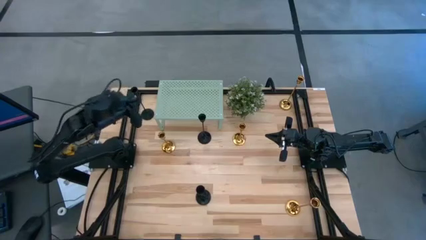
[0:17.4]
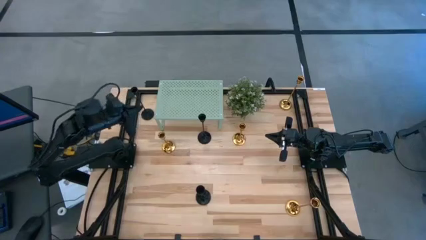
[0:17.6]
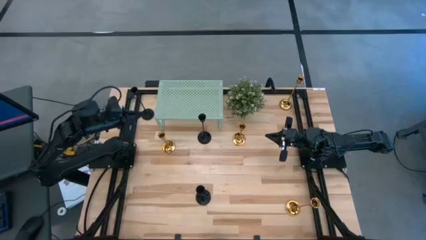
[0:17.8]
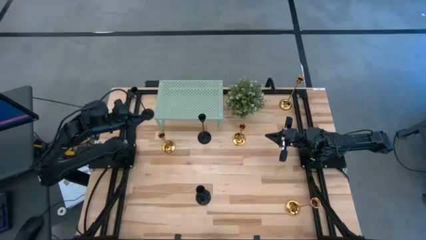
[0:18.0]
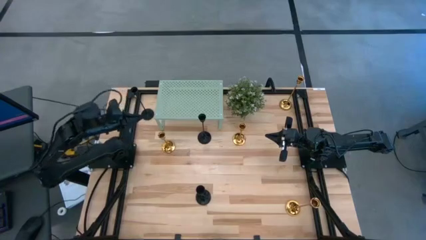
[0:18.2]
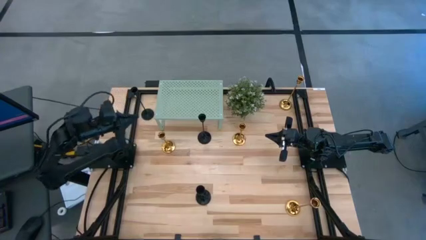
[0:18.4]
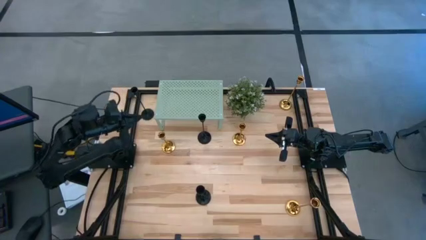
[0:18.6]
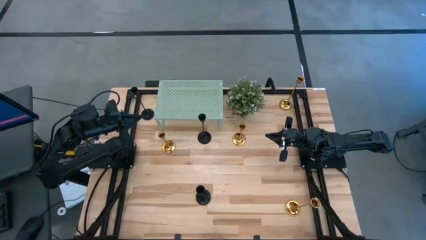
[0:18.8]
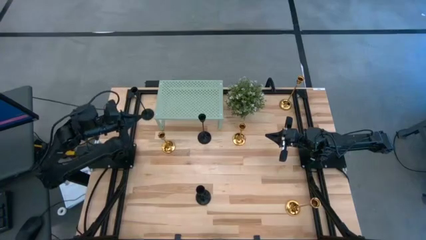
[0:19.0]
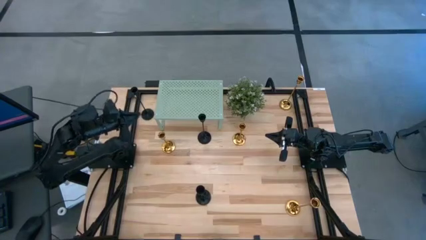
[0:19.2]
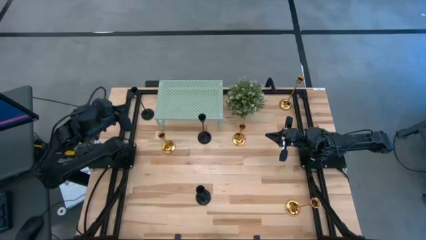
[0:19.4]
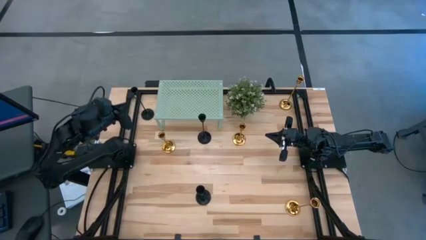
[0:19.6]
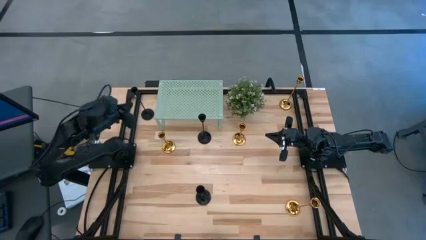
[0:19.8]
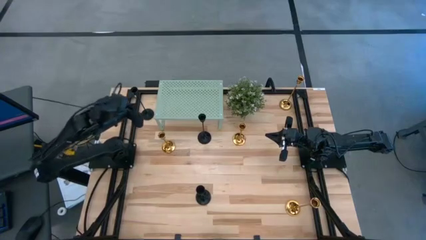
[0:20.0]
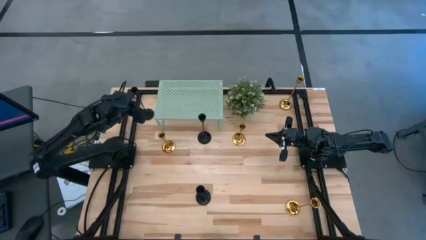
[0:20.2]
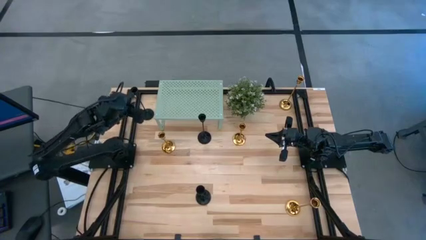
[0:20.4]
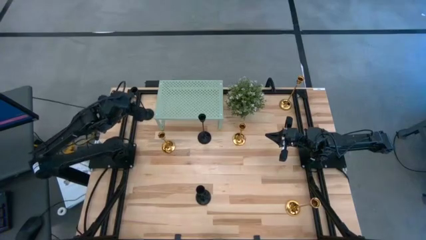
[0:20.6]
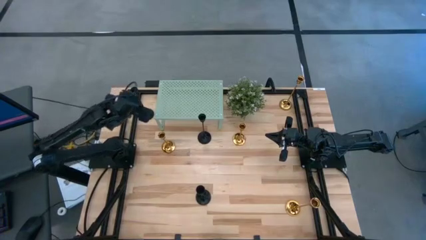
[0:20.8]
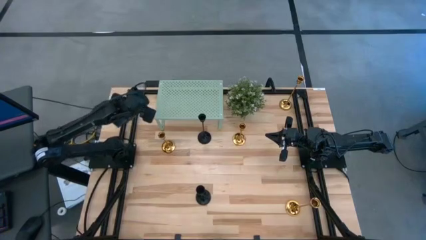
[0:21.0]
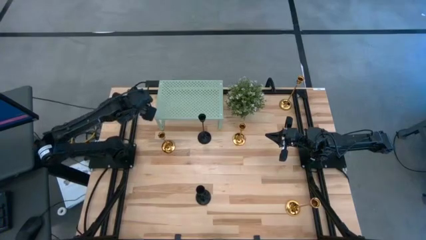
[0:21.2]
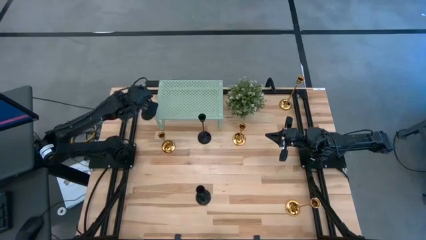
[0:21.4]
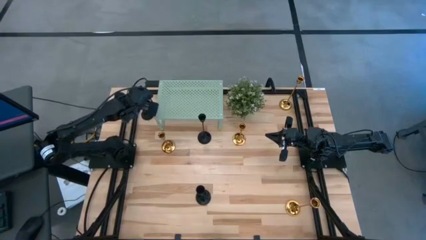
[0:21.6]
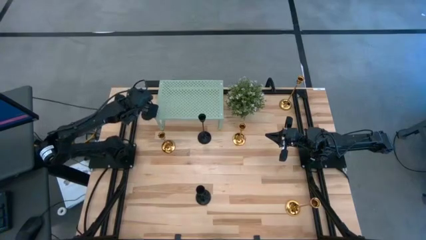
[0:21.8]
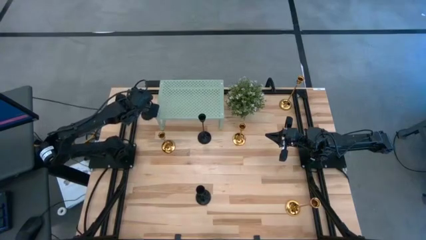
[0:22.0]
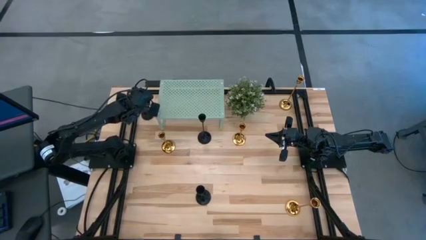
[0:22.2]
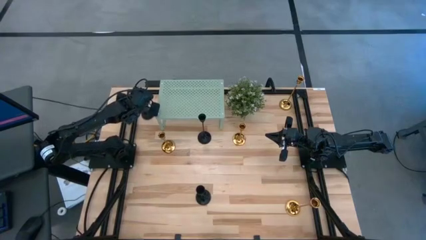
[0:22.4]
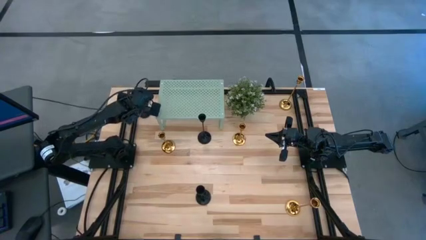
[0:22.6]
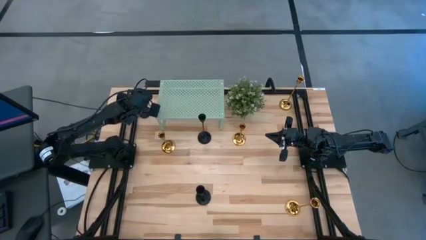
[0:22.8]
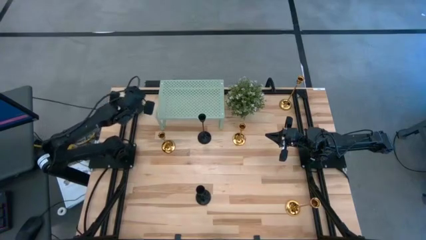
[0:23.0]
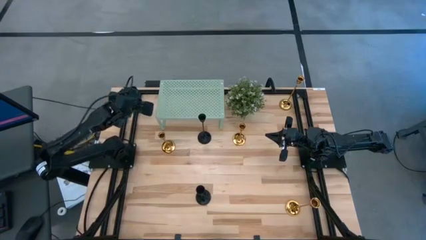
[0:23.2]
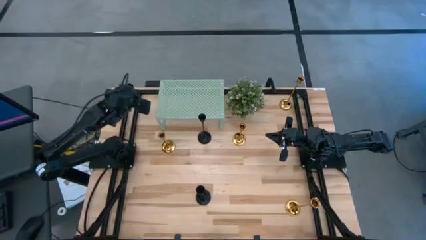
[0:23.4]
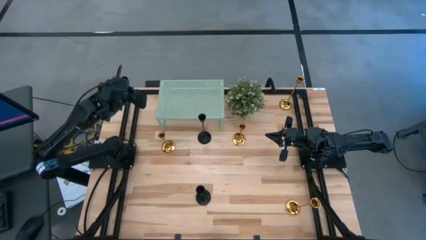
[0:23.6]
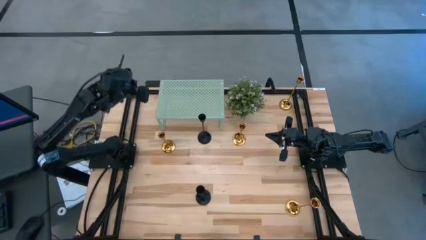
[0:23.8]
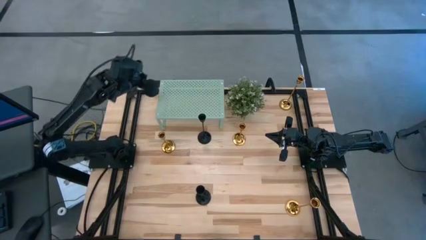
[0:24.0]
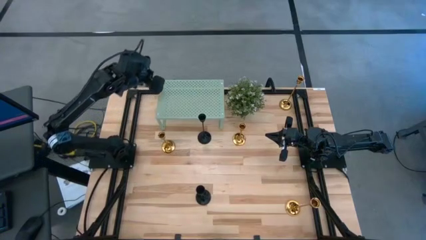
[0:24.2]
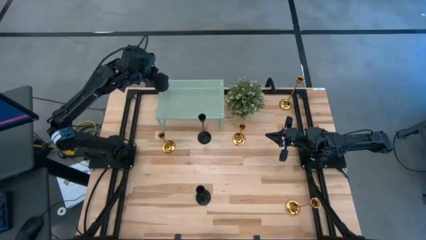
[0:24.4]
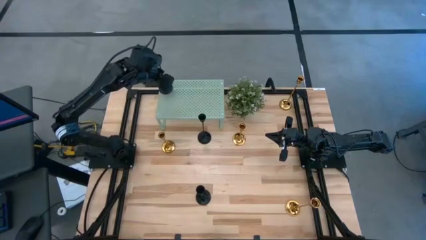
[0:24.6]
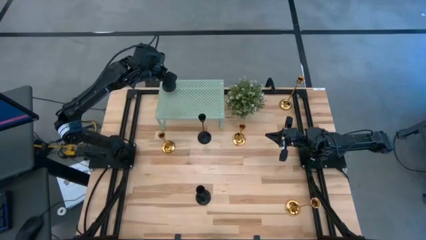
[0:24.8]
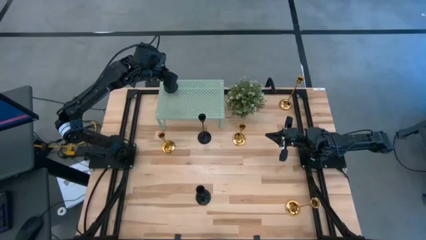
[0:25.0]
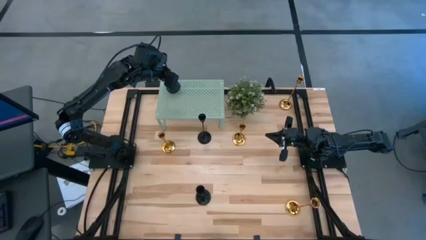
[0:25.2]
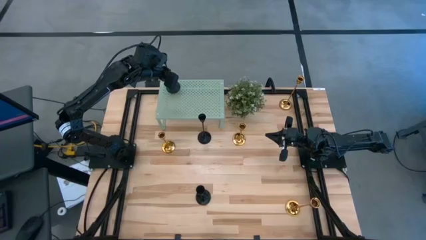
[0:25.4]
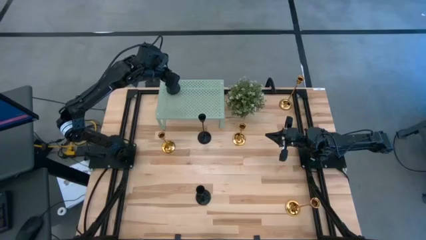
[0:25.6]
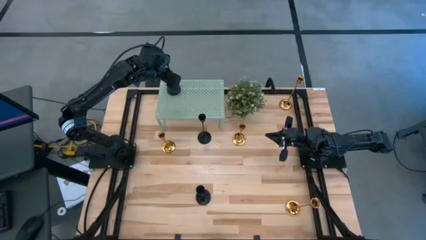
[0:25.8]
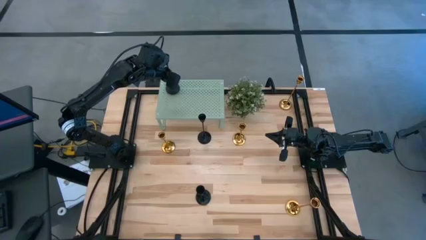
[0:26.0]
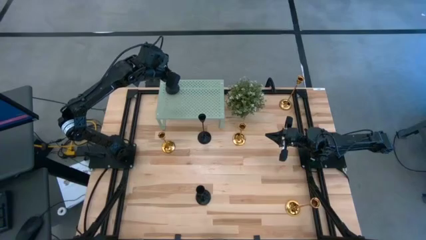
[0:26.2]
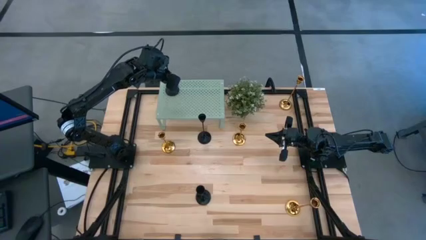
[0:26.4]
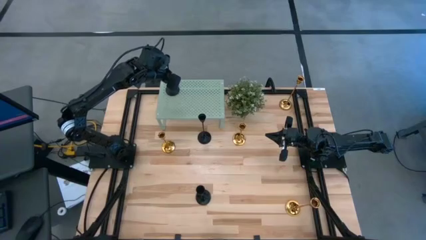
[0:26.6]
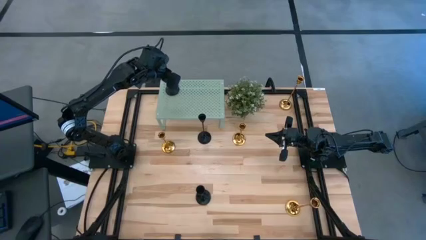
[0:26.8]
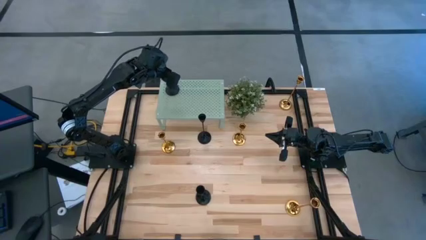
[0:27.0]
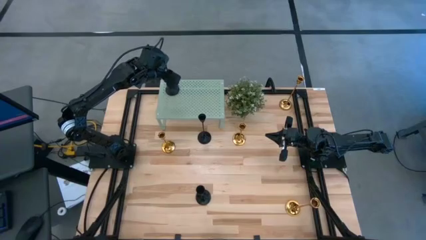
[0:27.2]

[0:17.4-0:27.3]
Task: Pick & Place candle stick holders
Put the black candle holder on the shelf

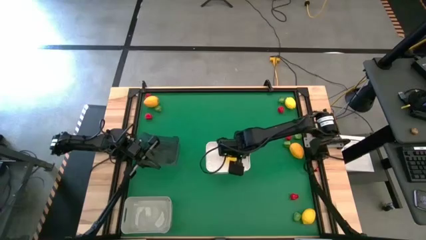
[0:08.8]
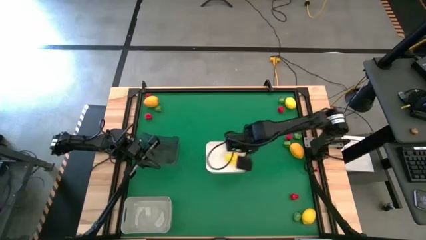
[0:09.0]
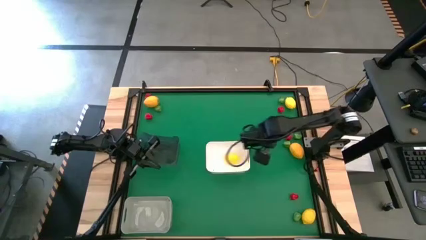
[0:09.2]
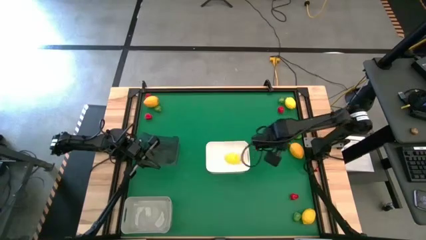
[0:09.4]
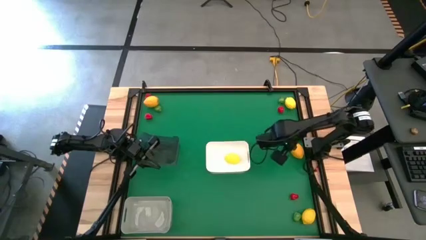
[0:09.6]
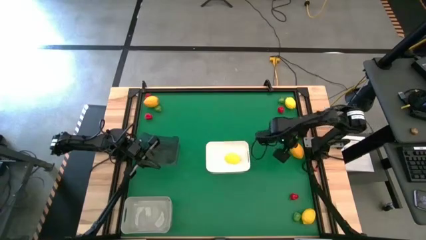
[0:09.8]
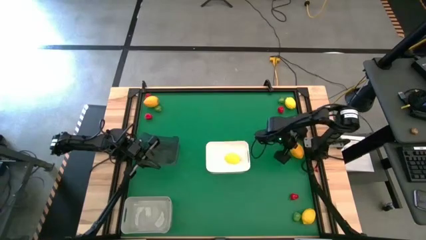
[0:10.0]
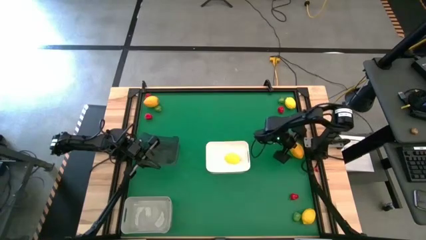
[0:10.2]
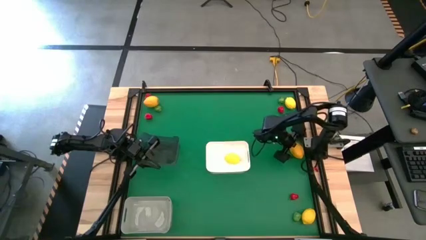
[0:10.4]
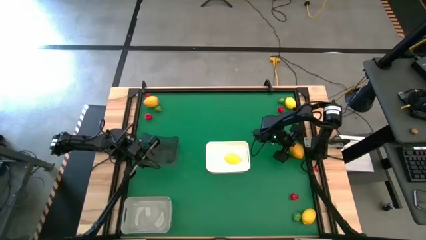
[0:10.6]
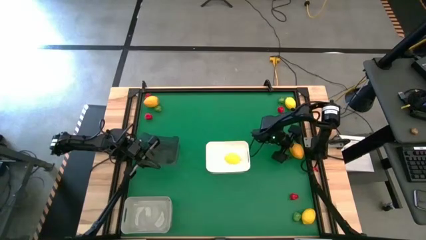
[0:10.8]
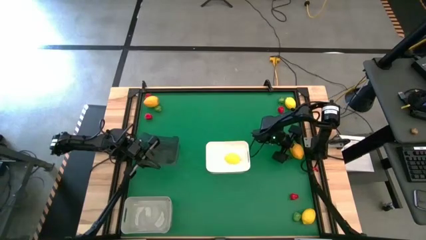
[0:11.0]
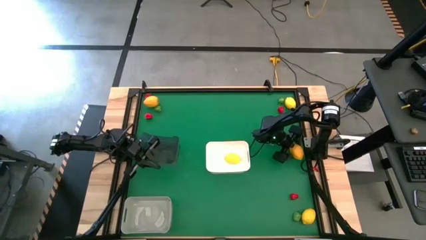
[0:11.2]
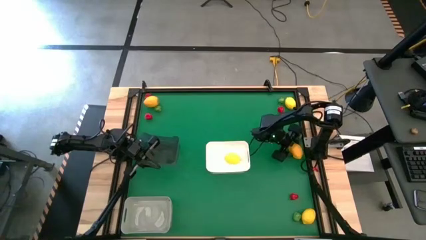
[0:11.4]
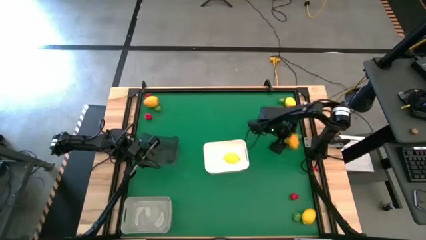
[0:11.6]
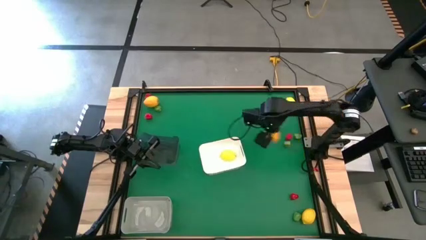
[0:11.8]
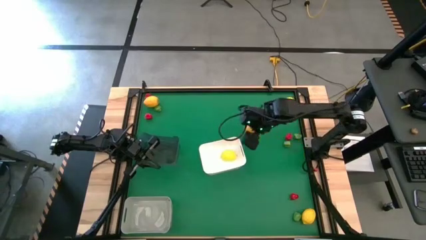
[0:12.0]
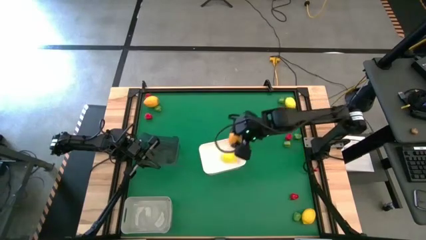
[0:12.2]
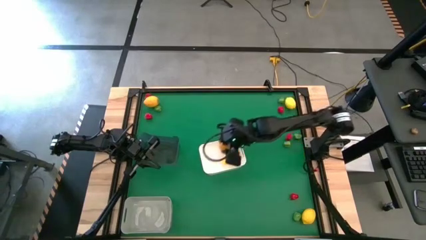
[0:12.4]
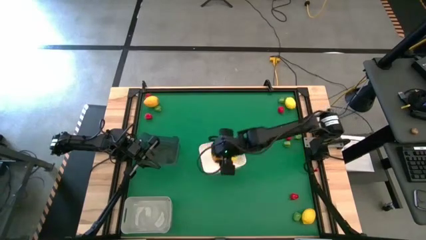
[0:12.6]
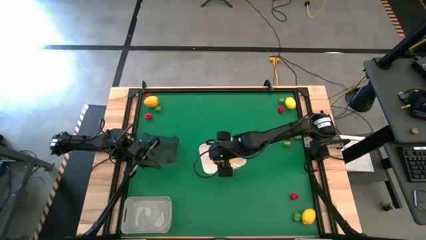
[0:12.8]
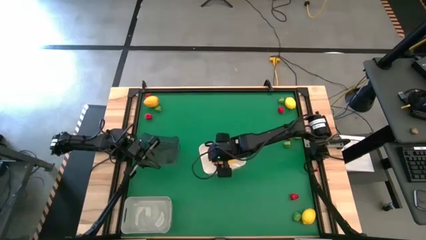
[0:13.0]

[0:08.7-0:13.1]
Task: Sort produce into baskets
Put the yellow lemon into the white bin

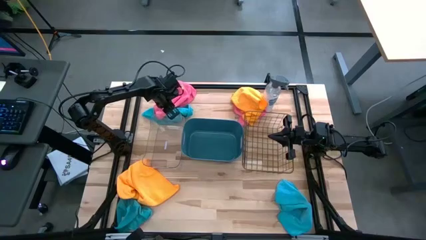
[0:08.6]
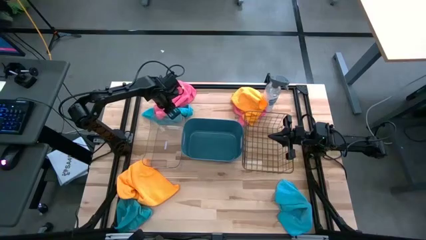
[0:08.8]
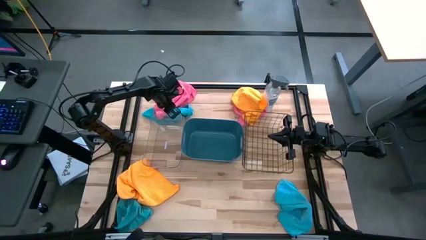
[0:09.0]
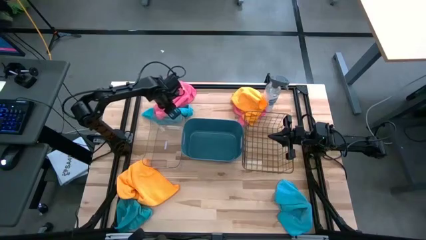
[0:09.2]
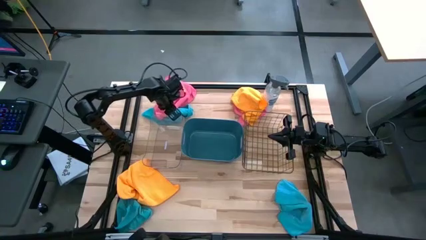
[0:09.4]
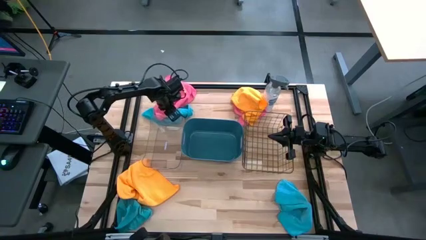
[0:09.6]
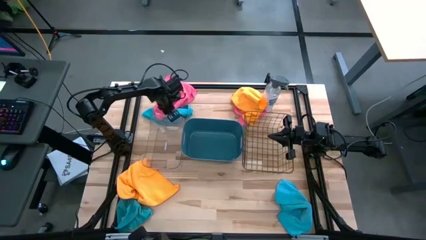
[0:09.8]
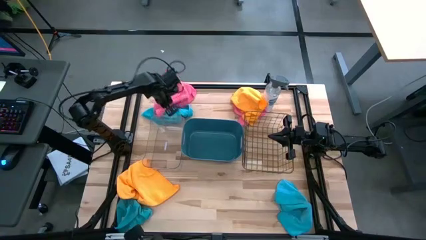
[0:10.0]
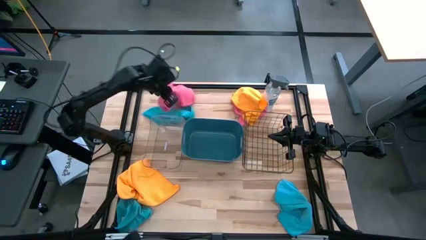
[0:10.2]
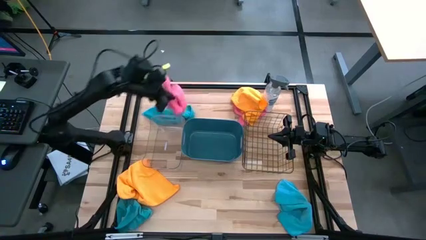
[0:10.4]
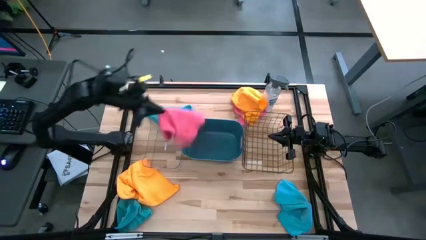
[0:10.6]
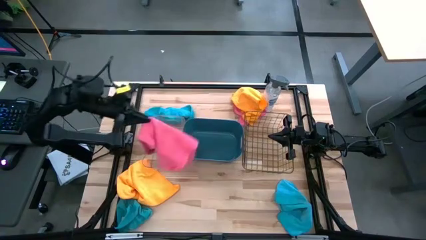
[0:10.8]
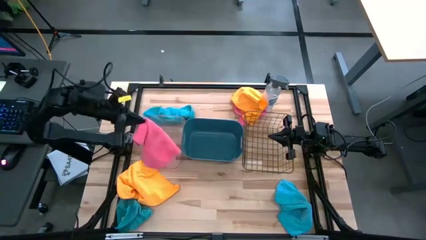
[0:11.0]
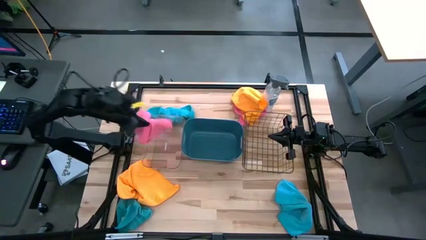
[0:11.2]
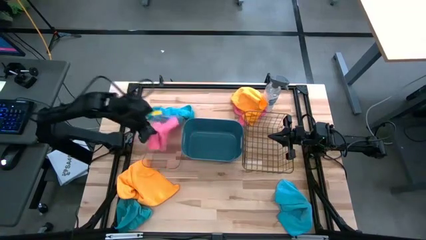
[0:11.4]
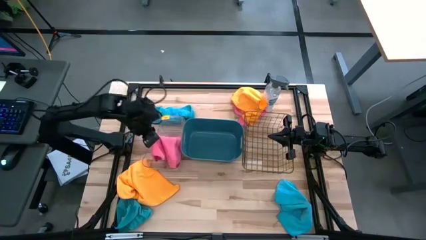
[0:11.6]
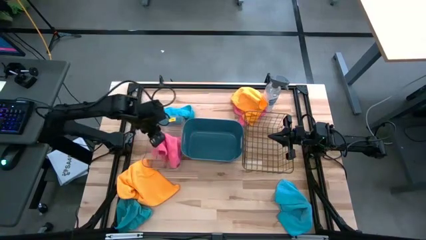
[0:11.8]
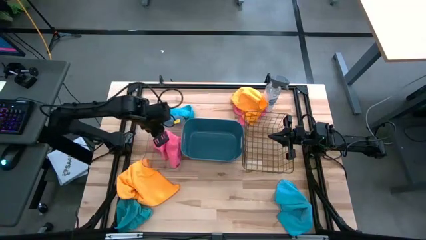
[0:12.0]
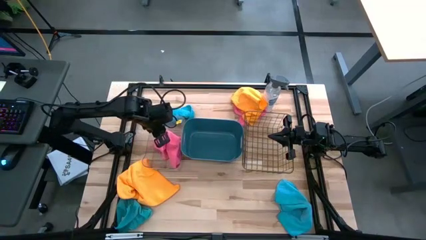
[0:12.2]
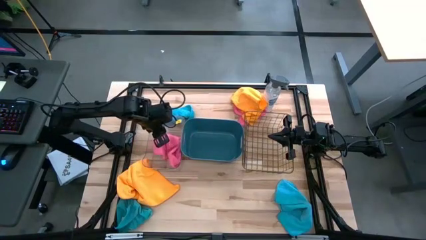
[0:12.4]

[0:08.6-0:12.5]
Task: Sort microfiber towel by color & place in baskets
Put the left pink microfiber cloth into the transparent bin
